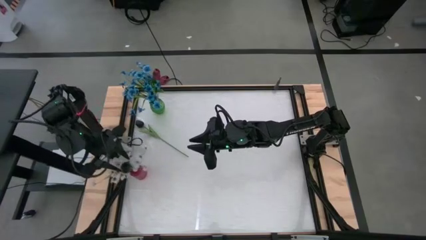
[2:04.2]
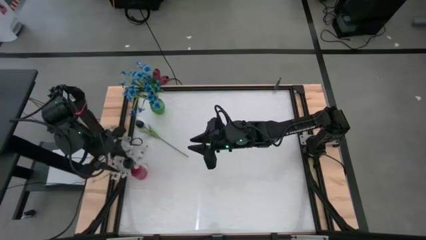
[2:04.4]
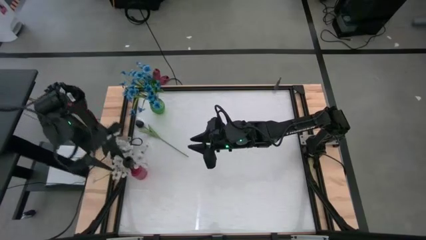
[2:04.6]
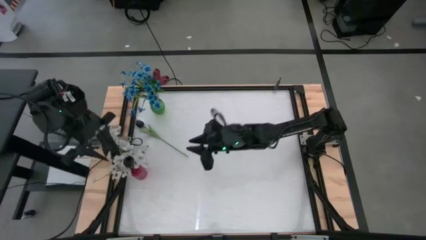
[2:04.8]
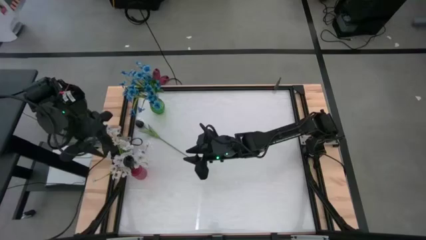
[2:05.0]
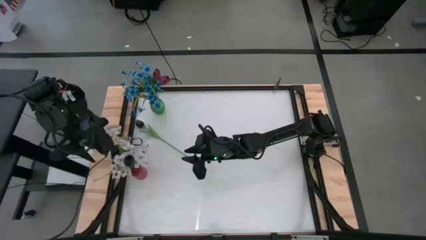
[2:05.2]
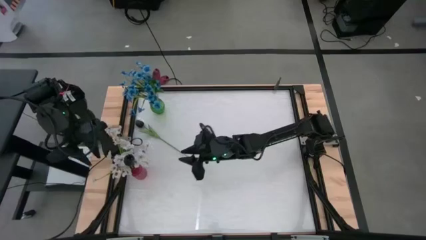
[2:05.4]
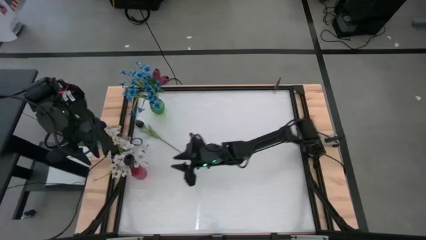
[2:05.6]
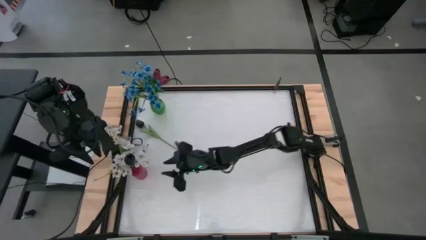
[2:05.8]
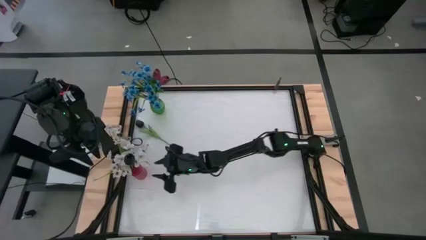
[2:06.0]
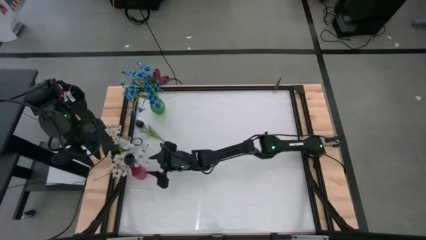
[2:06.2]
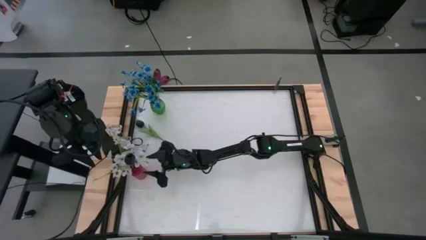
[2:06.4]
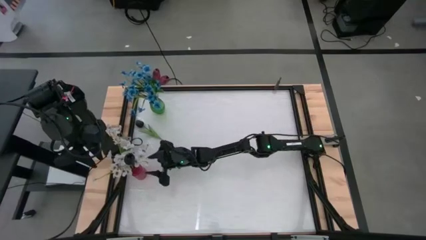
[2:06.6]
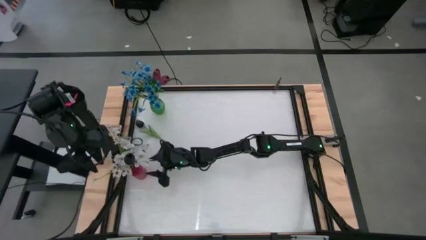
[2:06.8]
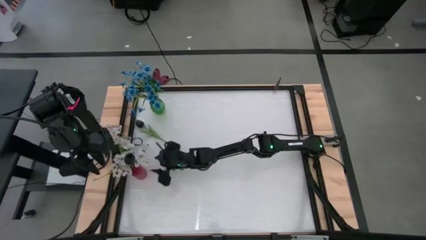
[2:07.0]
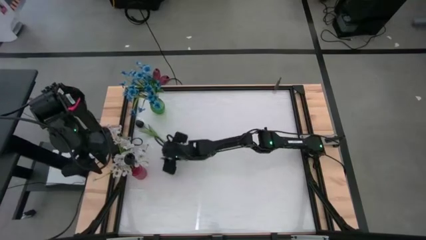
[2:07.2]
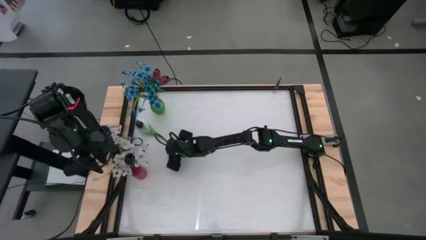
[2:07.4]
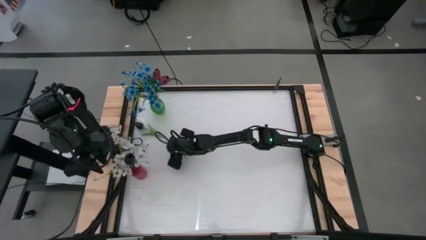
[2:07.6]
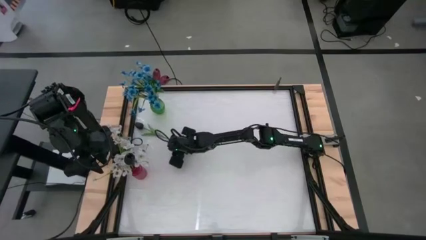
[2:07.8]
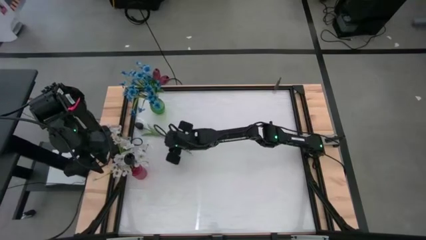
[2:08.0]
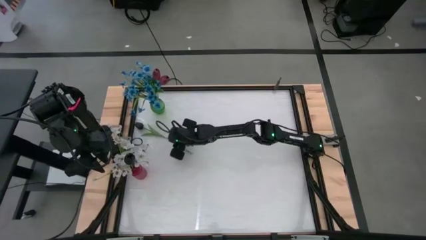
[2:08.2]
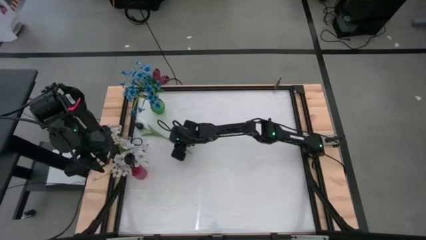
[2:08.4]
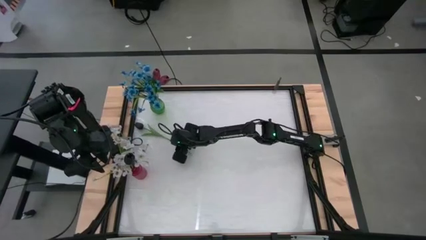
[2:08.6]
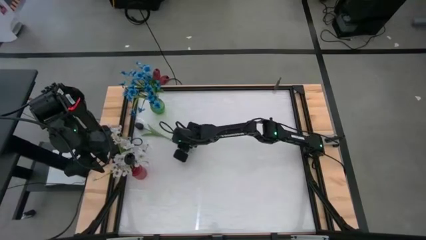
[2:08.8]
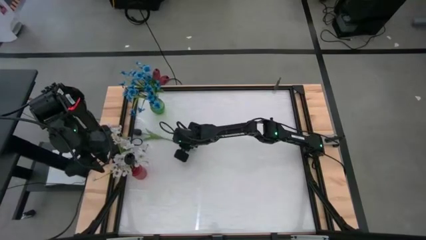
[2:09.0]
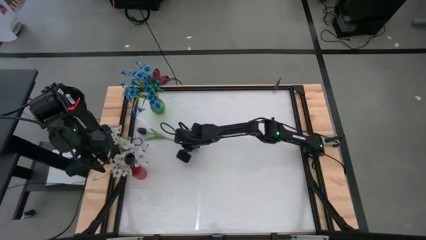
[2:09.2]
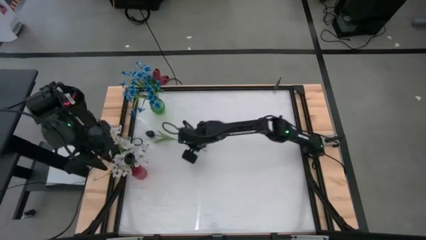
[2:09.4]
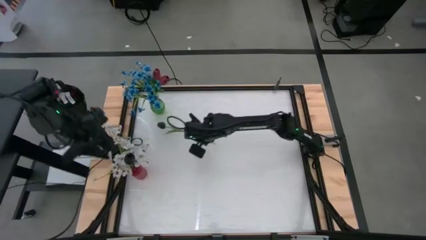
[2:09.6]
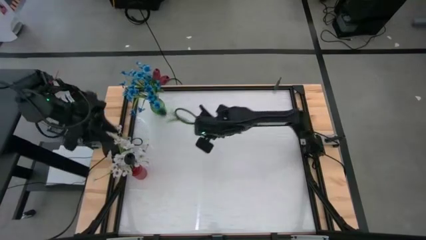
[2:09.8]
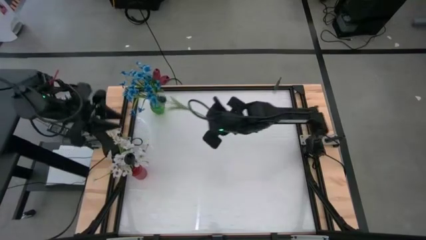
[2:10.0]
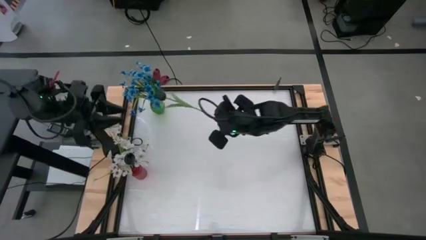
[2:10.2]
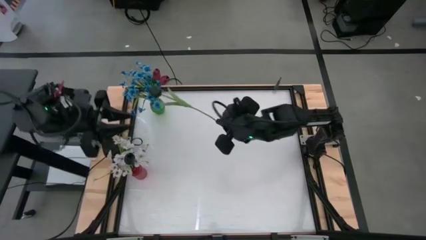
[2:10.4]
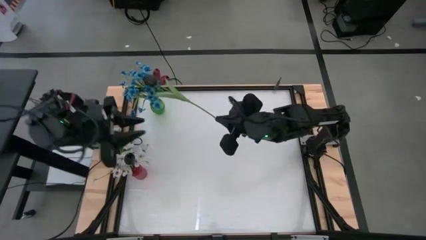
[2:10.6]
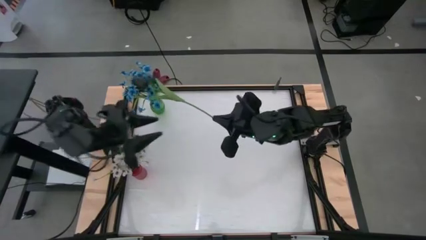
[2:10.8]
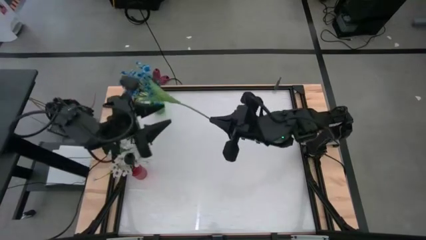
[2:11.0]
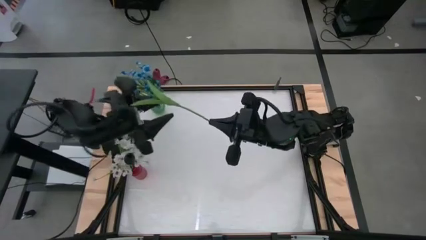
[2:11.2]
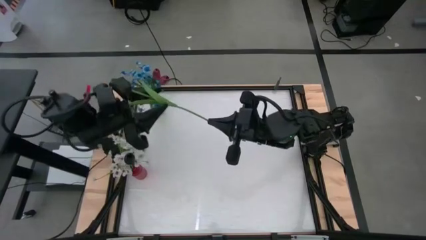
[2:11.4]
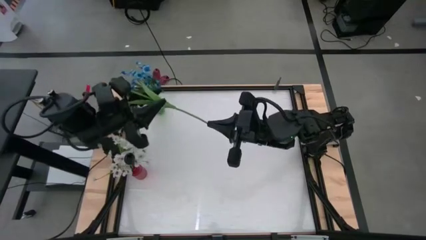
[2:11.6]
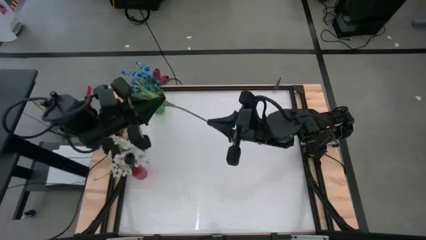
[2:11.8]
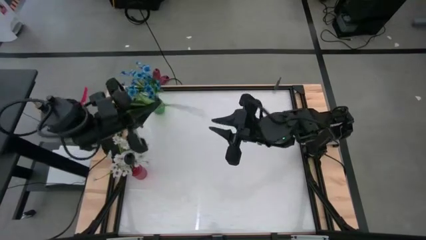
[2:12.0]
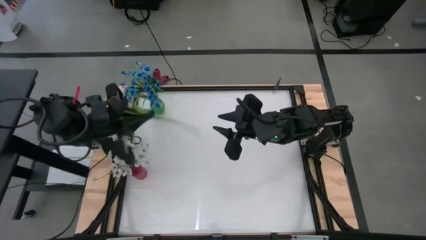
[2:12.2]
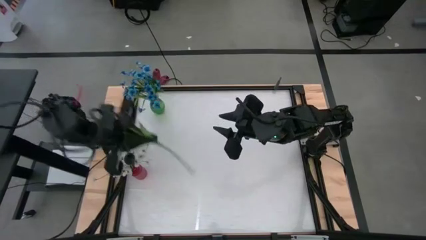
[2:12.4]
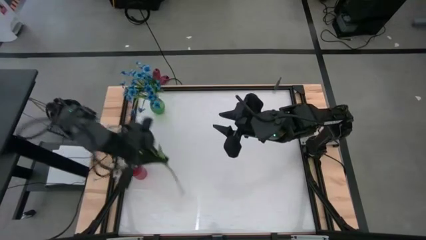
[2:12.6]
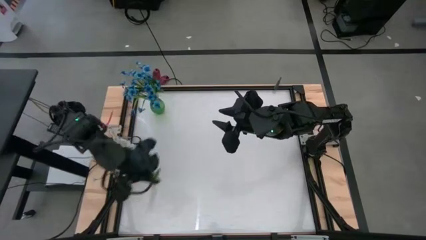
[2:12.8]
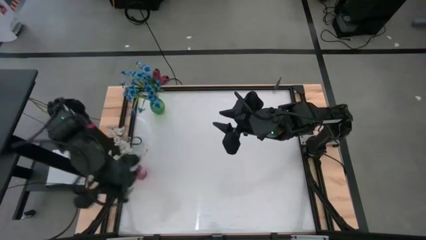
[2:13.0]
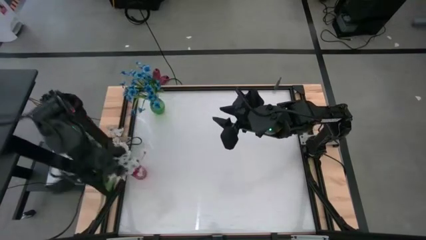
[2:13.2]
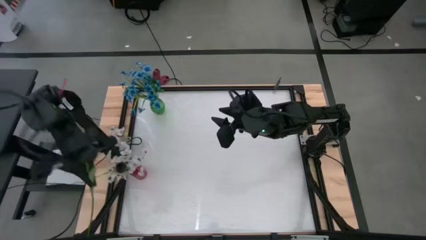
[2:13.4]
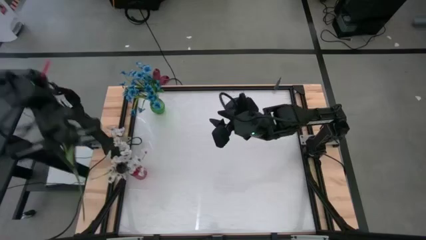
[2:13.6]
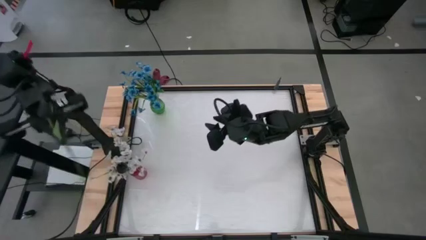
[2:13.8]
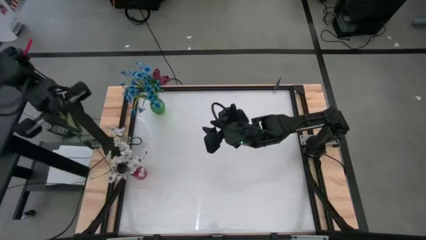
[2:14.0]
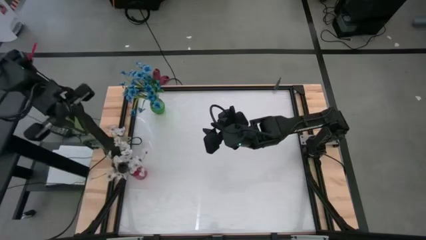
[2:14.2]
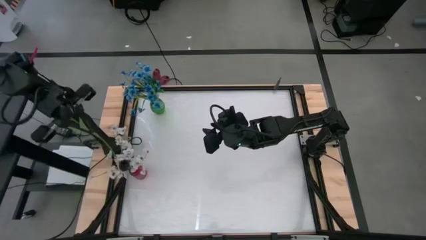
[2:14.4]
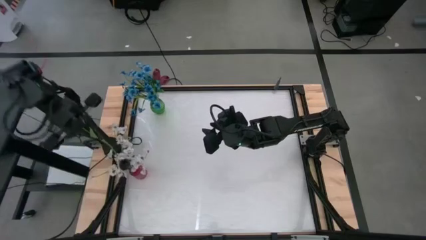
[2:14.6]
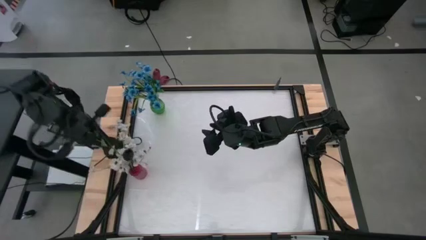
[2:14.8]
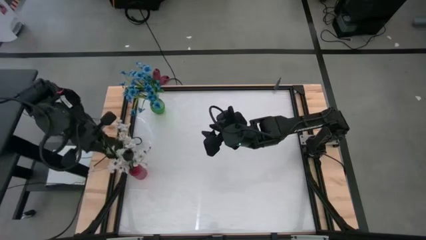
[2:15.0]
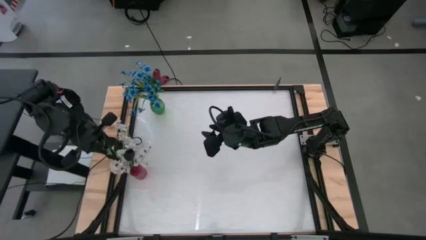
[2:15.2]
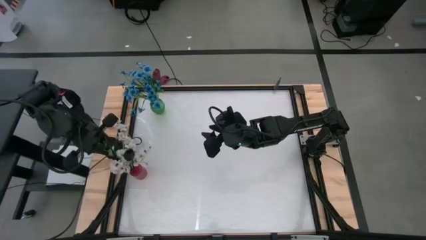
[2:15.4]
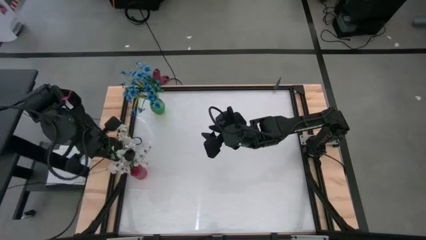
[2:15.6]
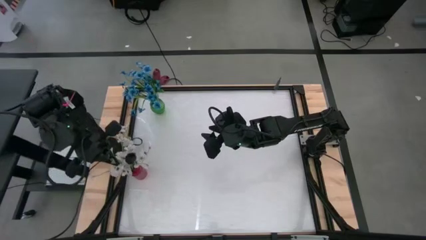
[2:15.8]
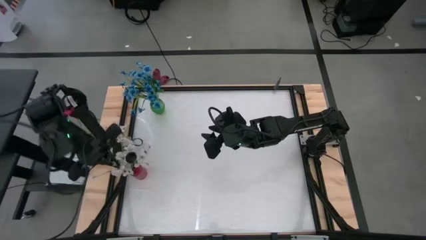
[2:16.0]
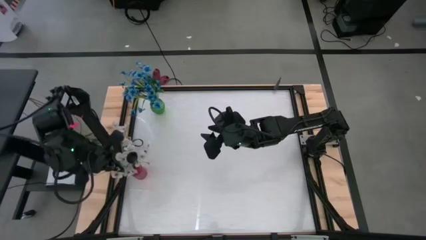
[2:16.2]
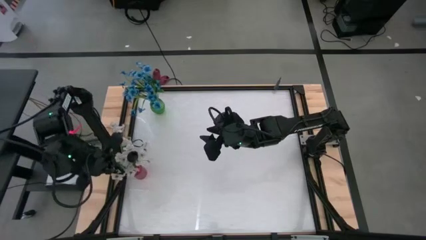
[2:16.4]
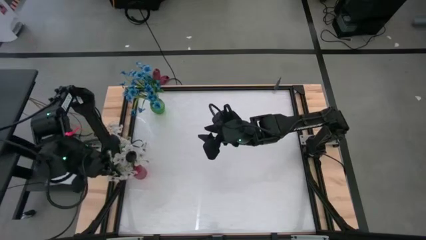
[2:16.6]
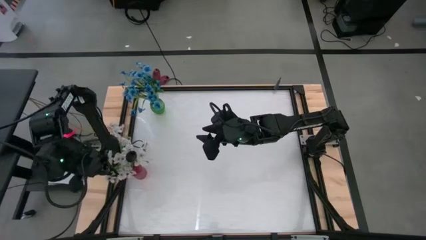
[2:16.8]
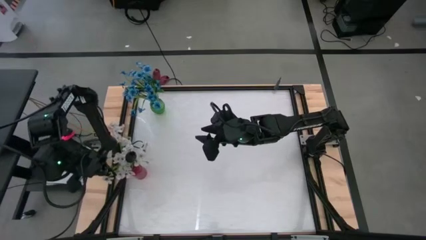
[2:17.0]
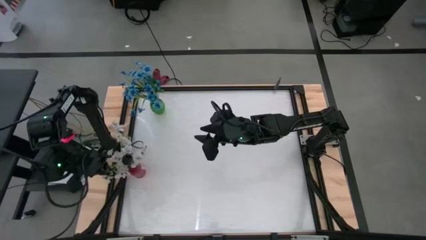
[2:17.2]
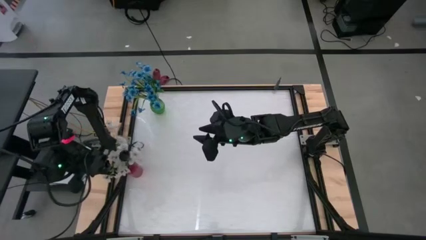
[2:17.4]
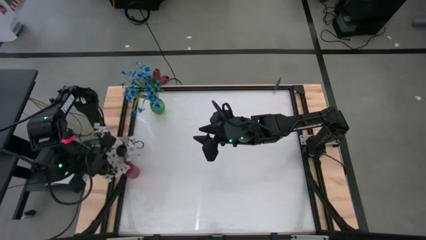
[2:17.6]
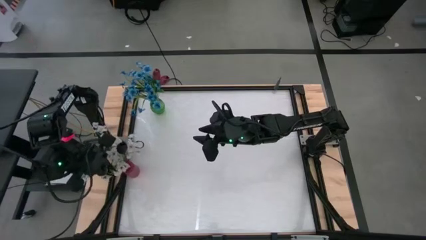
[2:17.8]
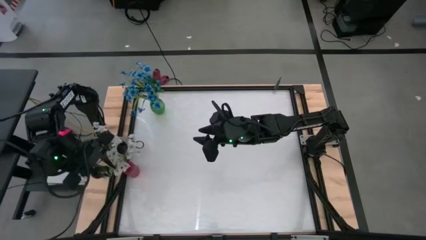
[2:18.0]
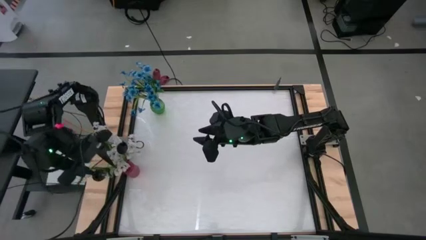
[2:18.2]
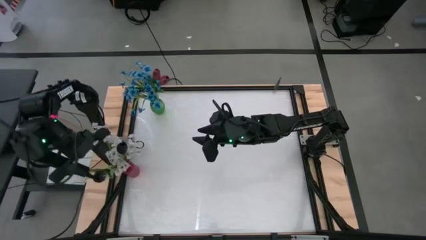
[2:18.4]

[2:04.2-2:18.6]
Task: Sort flowers into vase by color
Put the black tulip into the red vase

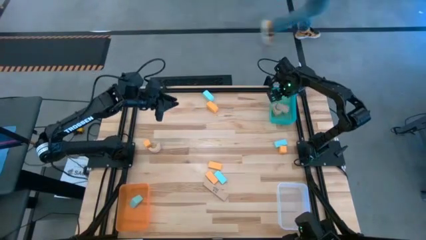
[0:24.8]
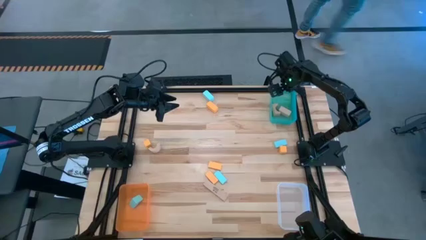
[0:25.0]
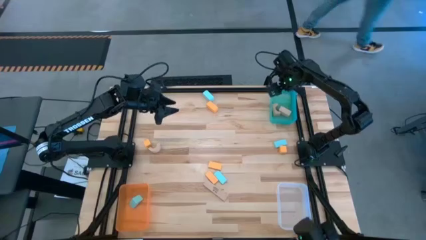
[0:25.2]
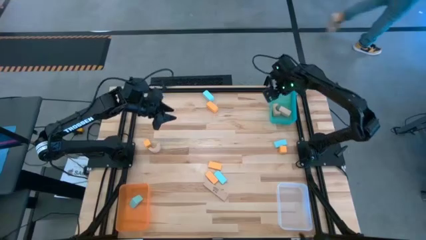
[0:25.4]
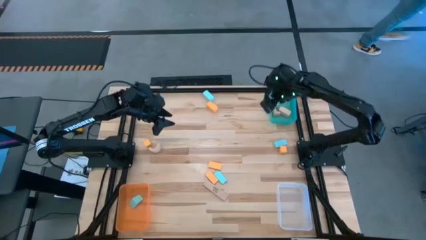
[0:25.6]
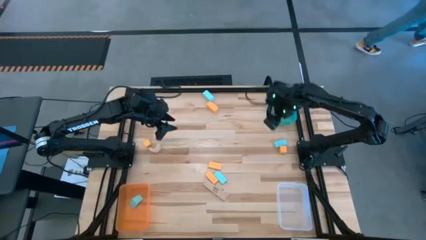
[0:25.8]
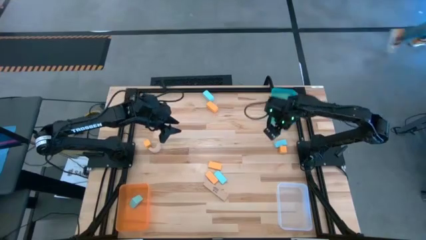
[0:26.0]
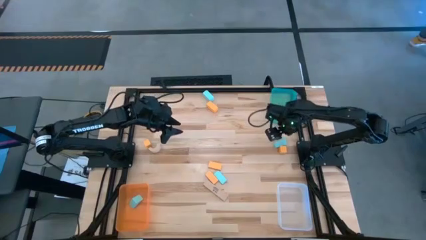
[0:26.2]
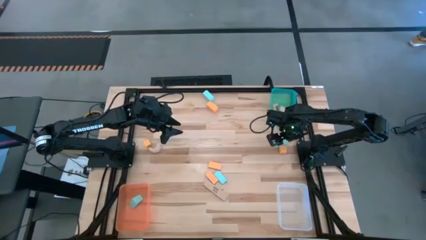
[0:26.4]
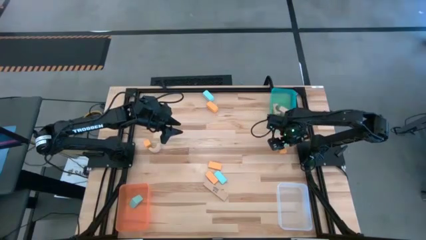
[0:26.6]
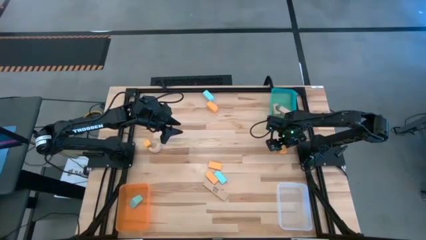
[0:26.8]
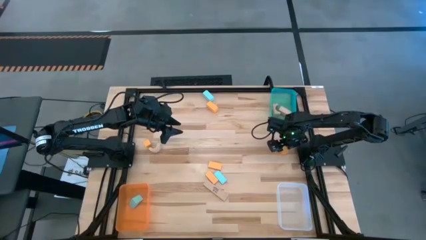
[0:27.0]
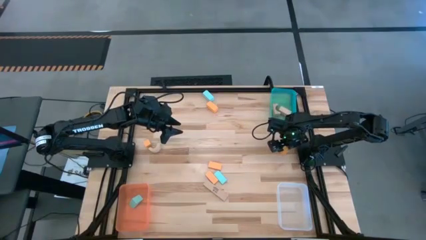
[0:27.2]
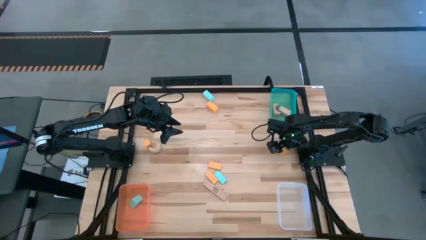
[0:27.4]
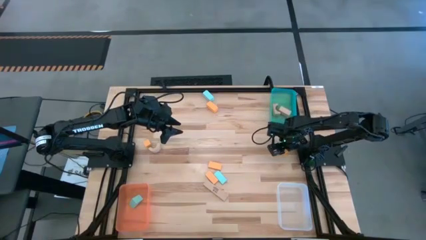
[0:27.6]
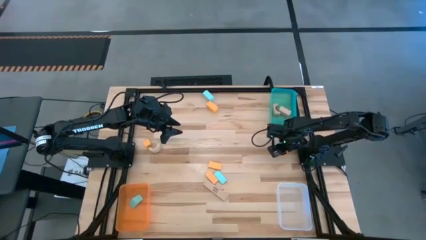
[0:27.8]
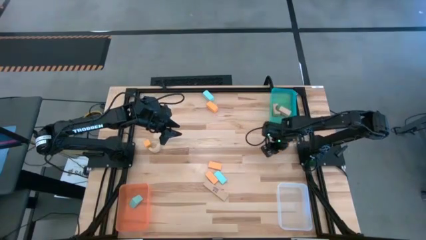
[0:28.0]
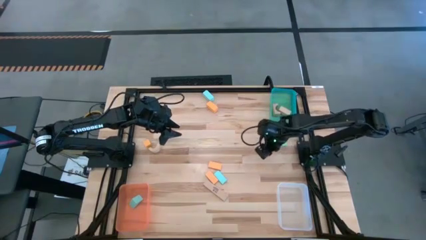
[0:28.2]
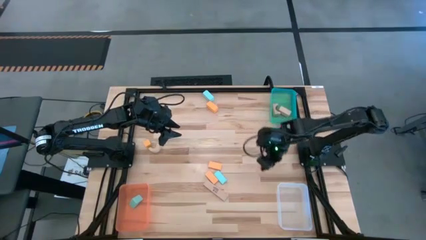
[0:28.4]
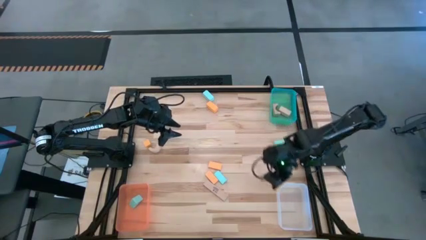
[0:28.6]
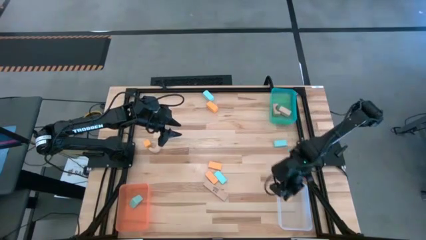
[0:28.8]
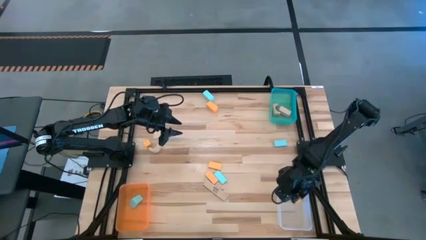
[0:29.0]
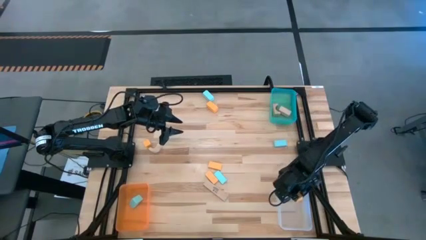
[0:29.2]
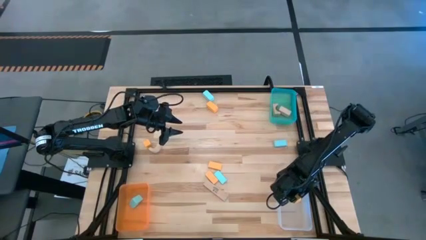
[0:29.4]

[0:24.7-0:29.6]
Task: Sort & place blocks by color
Put the yellow block into the transparent bin
